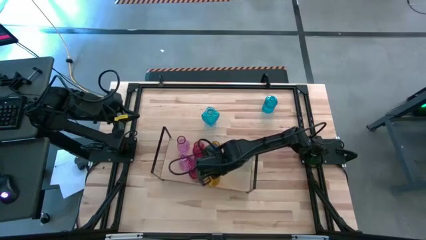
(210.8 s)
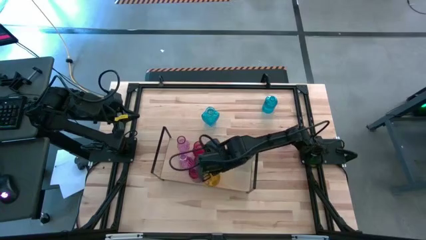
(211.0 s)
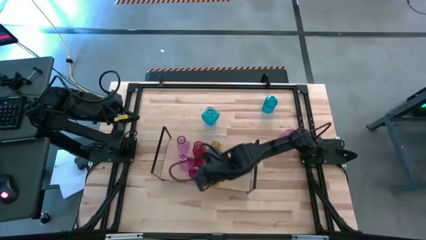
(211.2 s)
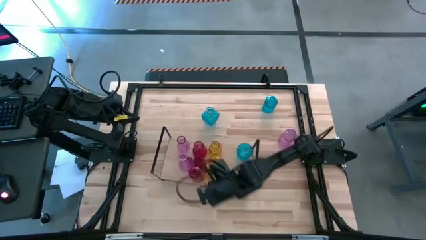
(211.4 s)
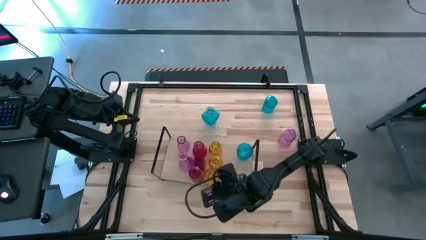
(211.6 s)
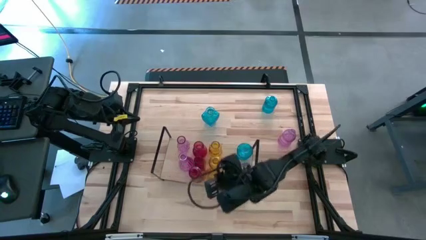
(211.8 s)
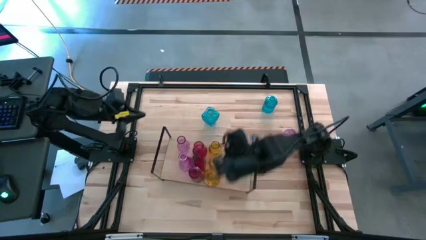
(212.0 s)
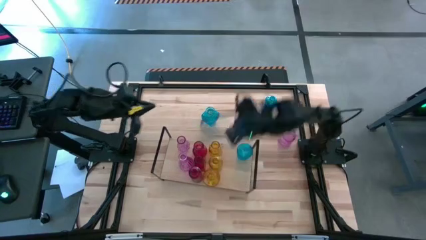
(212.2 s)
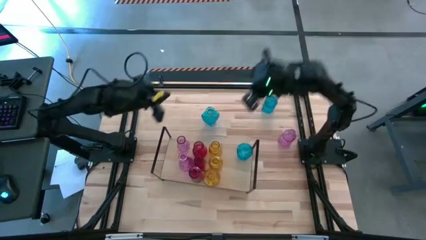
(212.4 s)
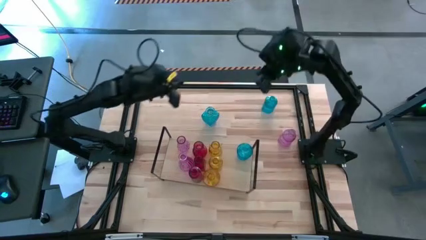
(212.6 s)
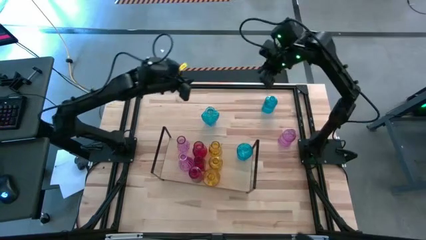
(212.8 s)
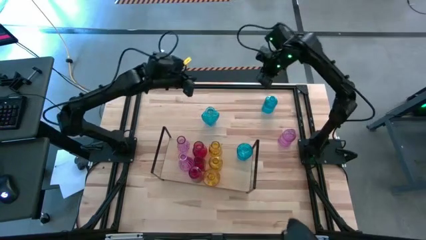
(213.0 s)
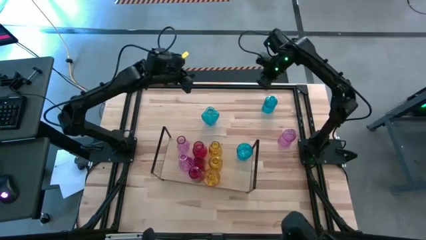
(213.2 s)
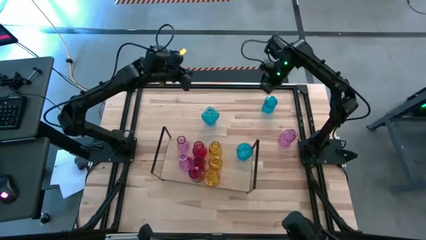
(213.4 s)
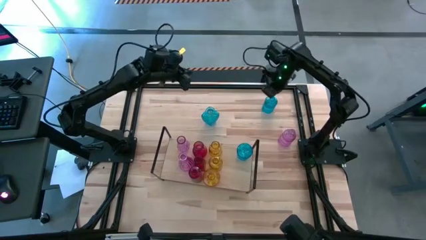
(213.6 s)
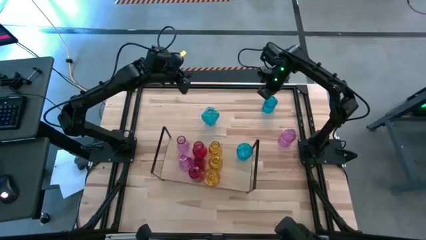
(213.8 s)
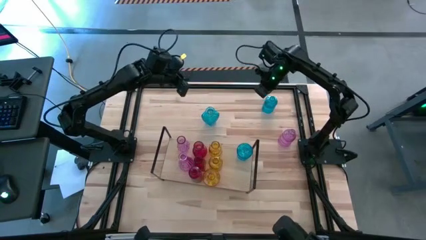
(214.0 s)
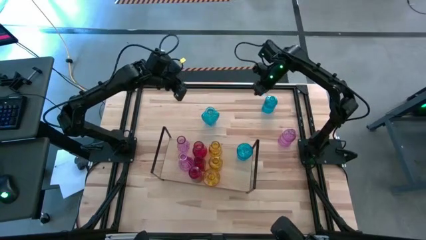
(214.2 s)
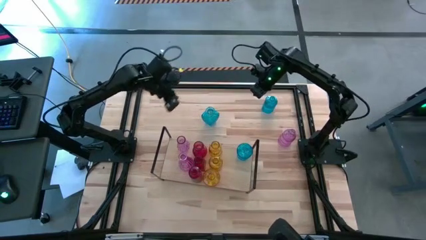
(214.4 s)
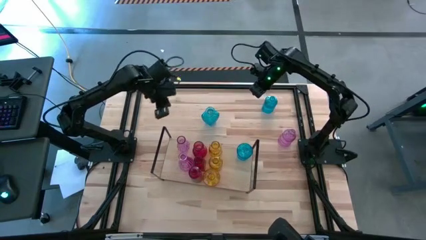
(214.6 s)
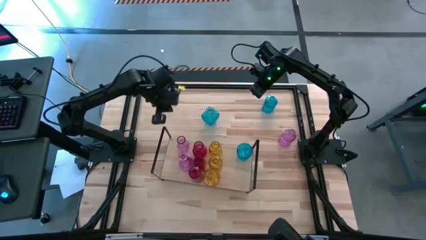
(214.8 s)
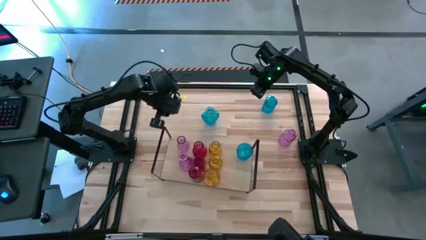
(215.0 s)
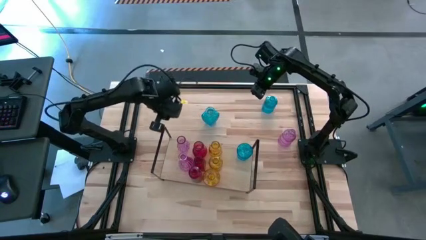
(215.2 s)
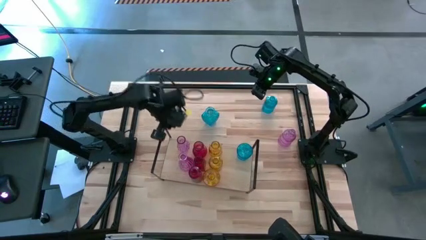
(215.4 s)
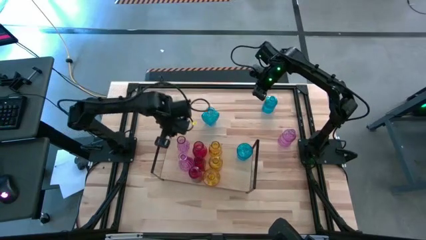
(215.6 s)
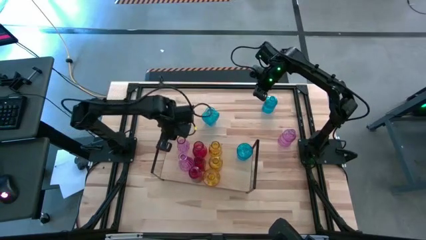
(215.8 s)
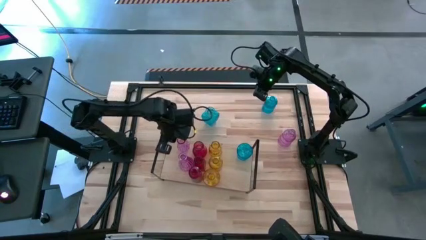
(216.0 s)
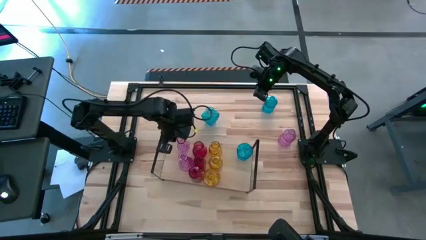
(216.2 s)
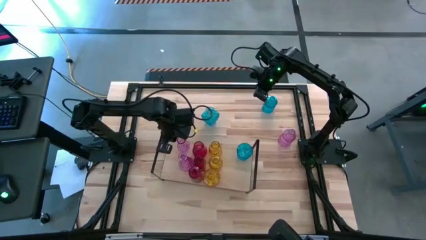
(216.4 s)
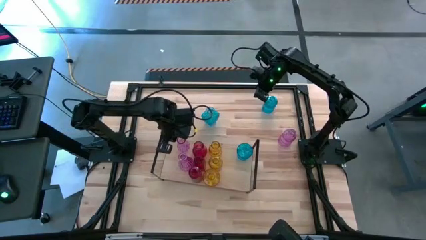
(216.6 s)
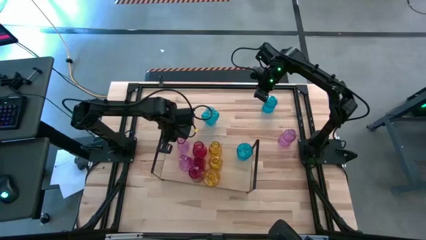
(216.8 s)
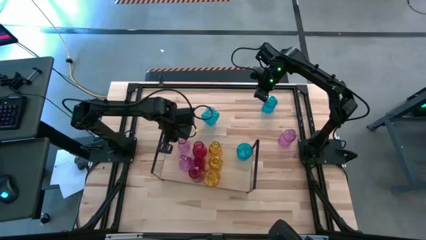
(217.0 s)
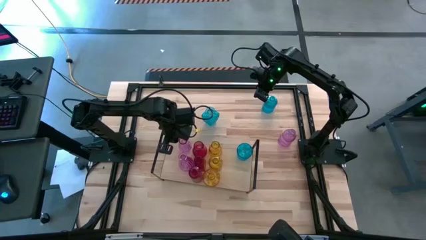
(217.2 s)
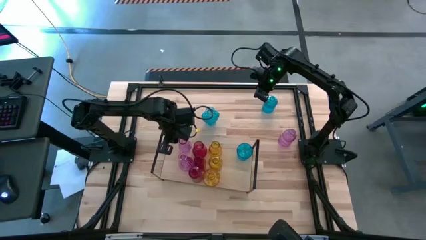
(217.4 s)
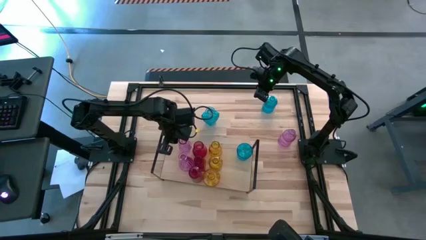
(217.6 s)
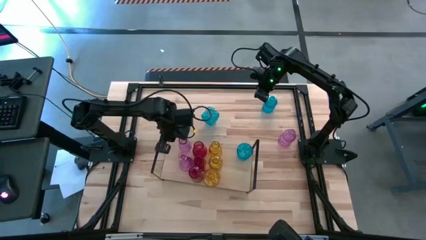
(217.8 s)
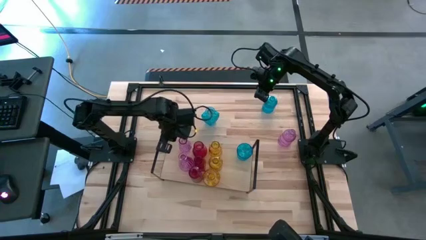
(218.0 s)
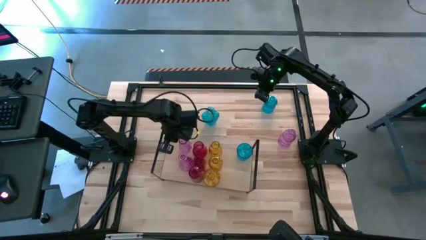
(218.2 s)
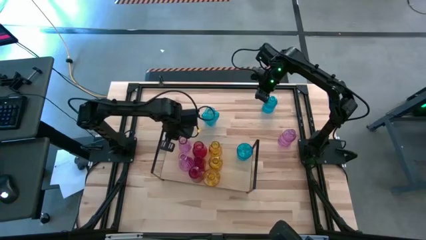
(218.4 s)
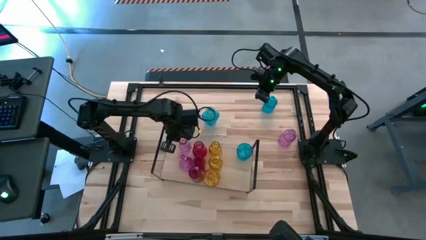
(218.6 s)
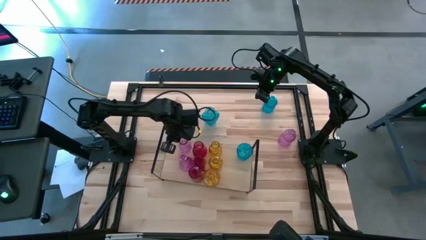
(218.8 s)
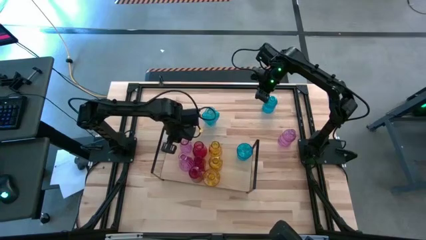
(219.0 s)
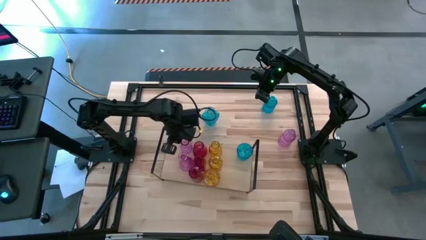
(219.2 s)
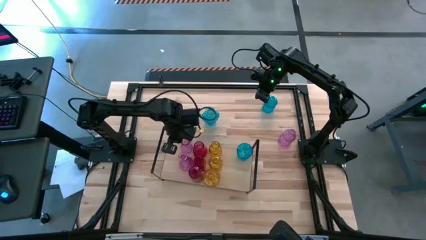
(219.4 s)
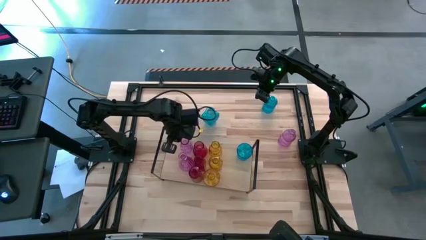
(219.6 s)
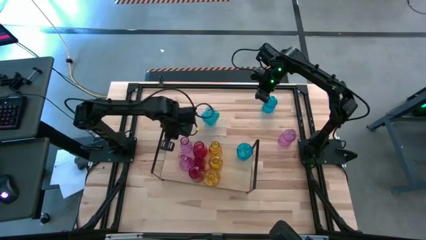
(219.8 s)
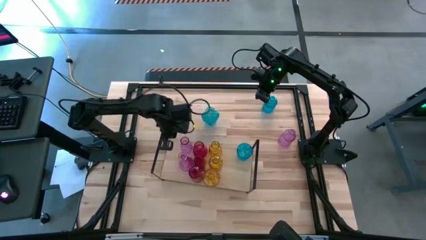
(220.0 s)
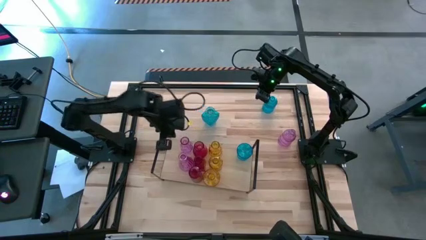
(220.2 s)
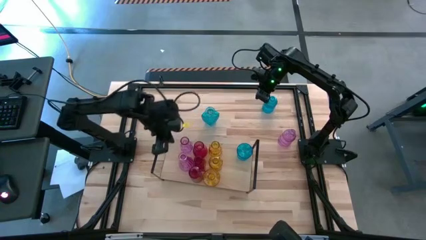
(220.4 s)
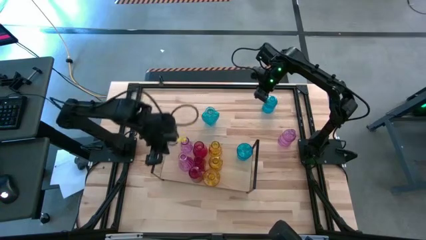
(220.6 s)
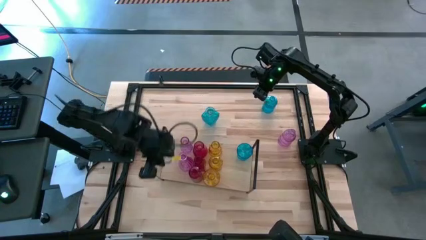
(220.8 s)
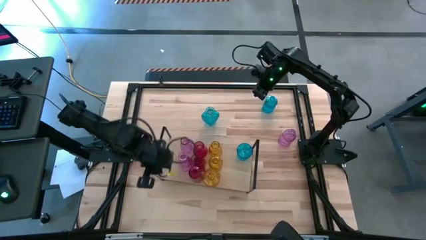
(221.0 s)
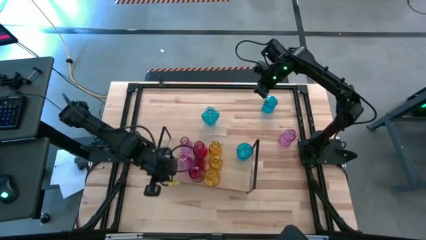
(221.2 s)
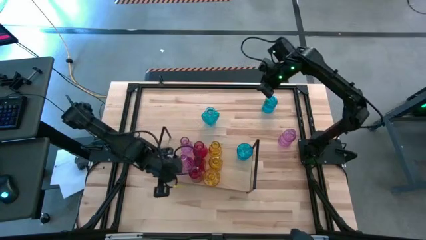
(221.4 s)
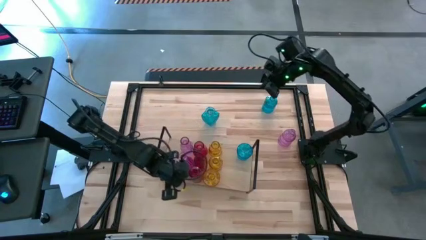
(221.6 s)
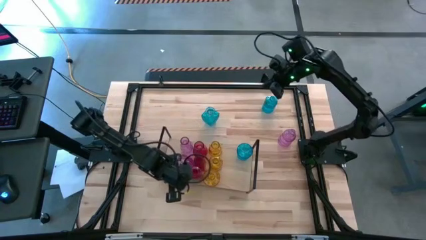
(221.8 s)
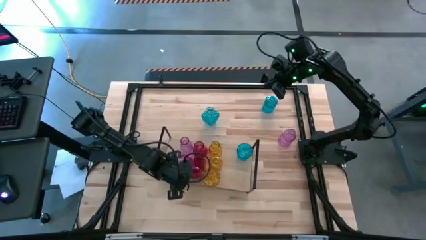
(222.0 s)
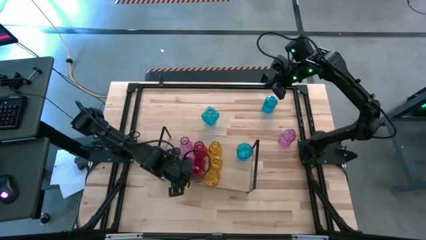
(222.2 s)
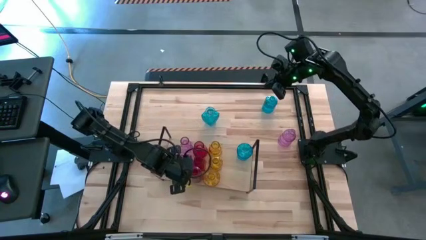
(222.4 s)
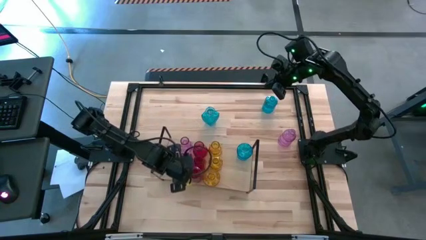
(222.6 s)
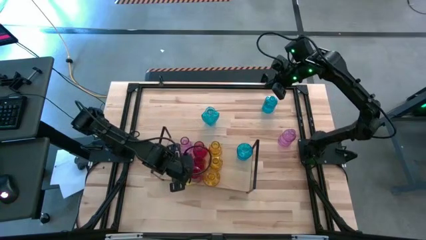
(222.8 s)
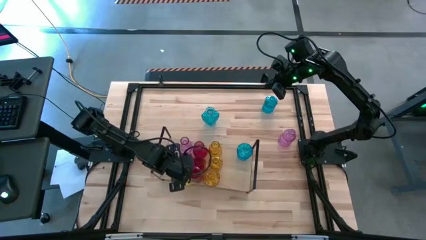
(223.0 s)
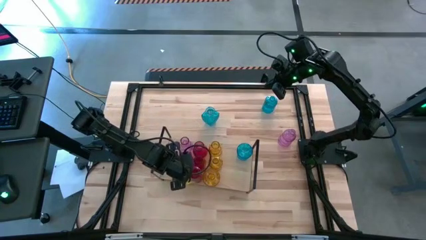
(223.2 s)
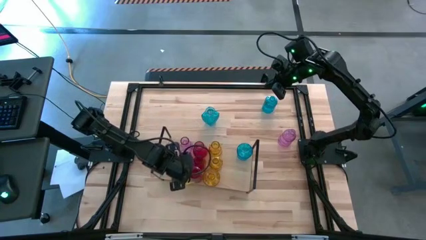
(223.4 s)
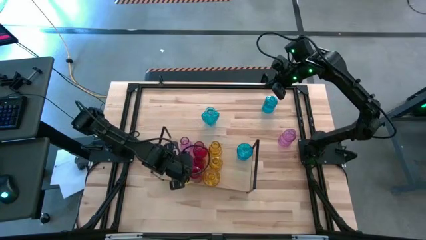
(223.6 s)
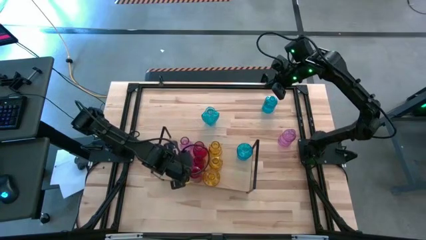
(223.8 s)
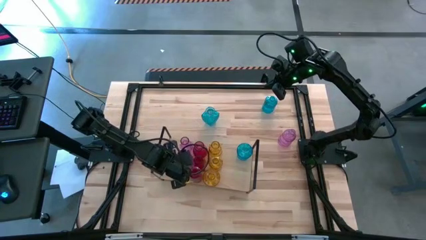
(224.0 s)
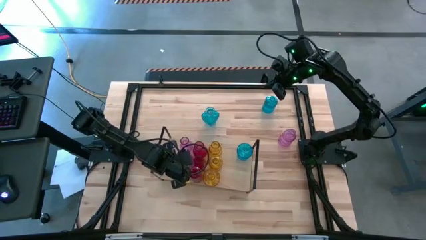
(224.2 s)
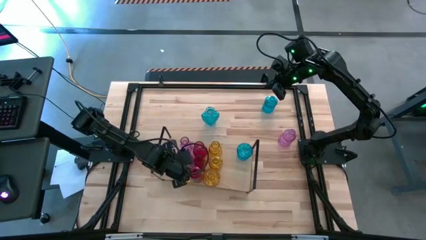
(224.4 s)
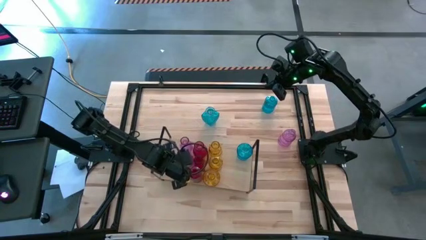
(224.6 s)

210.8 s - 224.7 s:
Task: sort vases onto shelf
Adjust the violet vases on the shelf

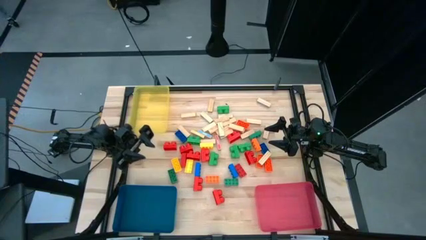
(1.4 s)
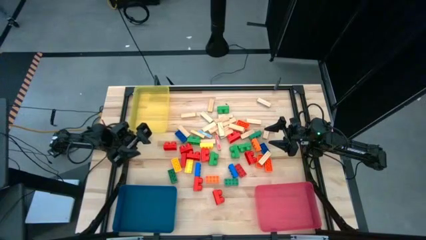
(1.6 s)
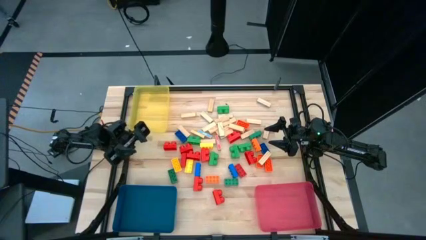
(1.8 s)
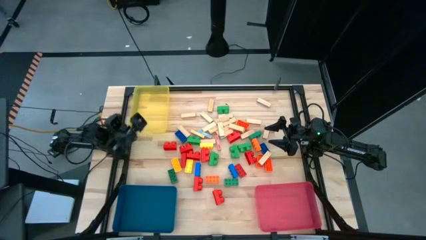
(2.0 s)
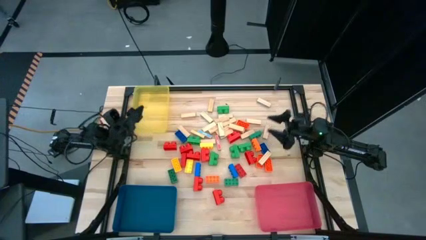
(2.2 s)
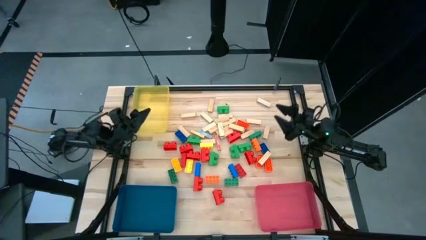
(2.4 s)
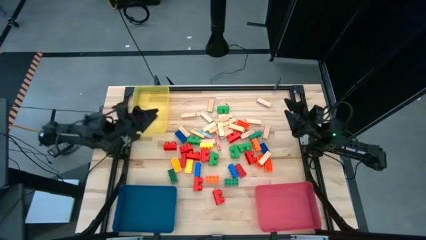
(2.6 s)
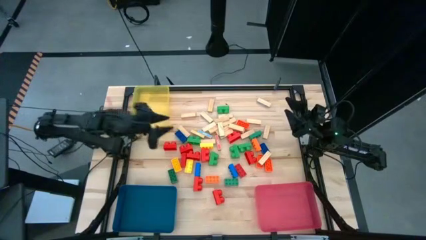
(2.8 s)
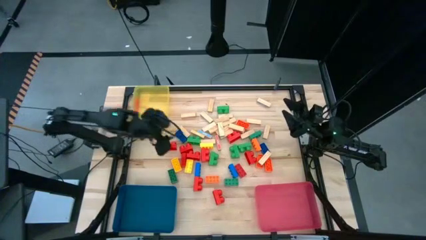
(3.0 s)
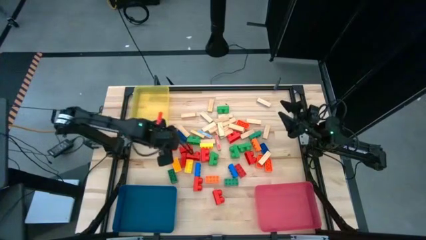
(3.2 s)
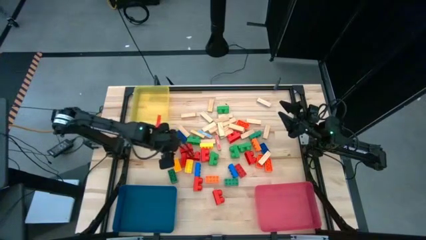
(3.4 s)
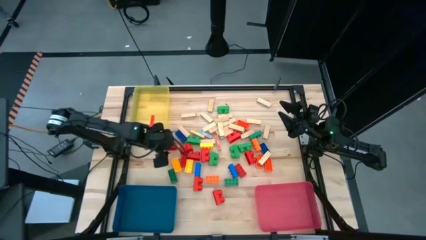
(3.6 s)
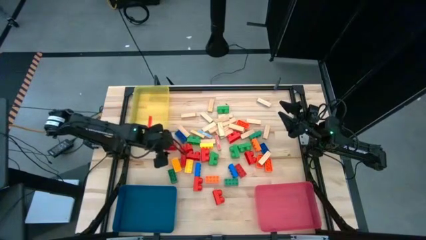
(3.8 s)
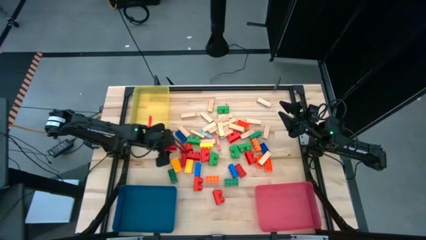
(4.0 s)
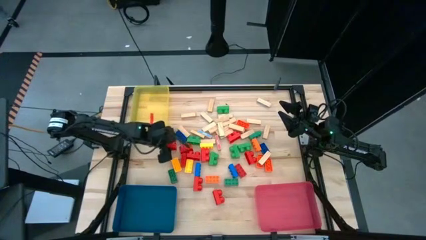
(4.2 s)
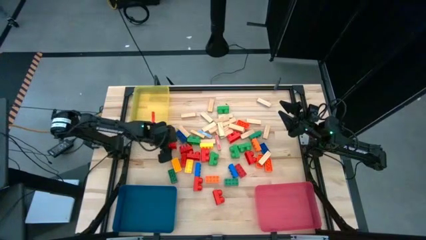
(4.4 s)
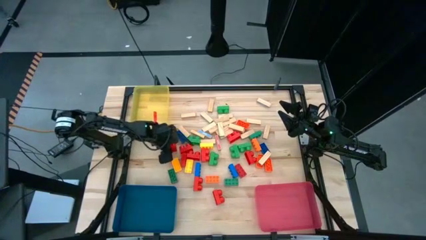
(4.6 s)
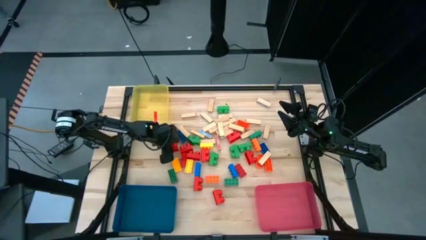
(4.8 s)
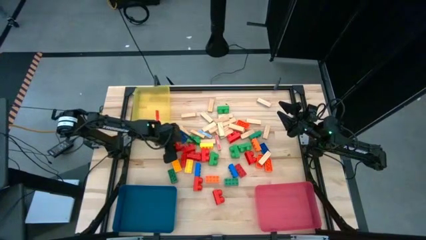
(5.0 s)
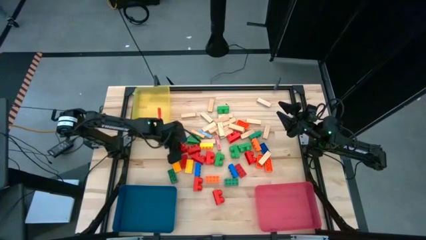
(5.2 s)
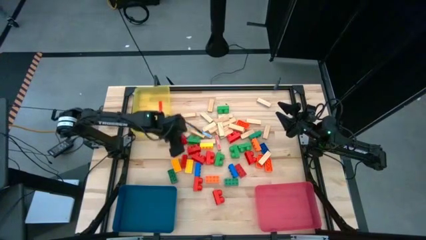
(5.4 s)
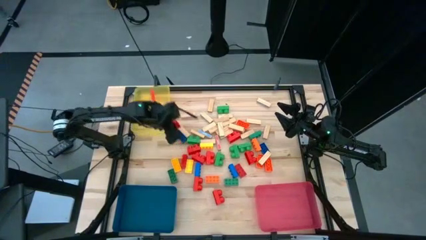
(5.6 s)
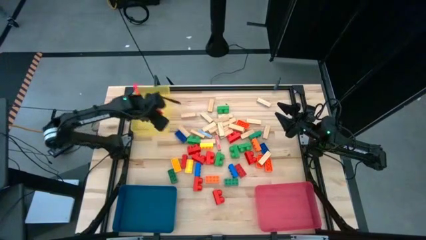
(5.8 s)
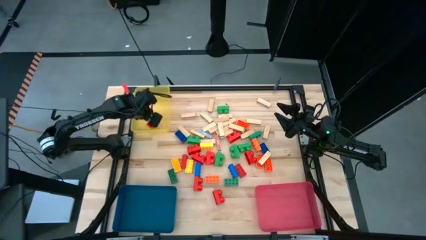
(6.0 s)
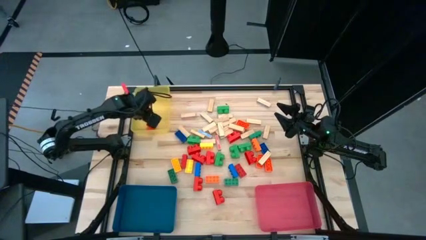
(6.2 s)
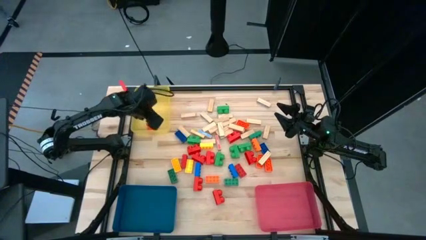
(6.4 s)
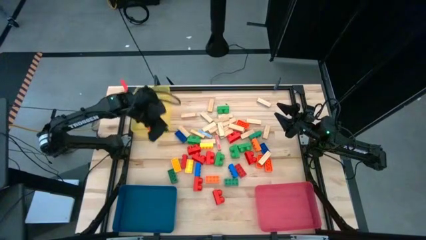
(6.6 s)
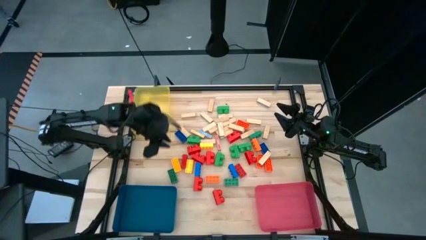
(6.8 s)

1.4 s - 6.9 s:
Task: Sort blocks by size
Put the red rounded game piece into the yellow bin
